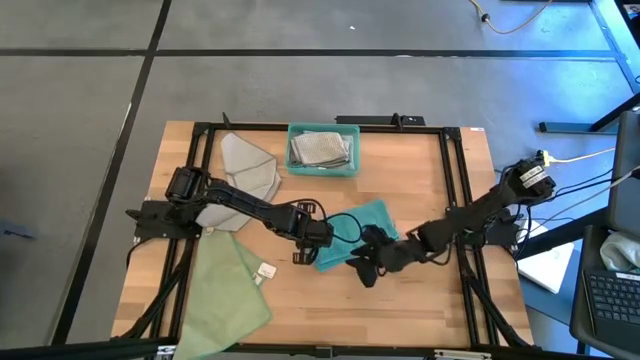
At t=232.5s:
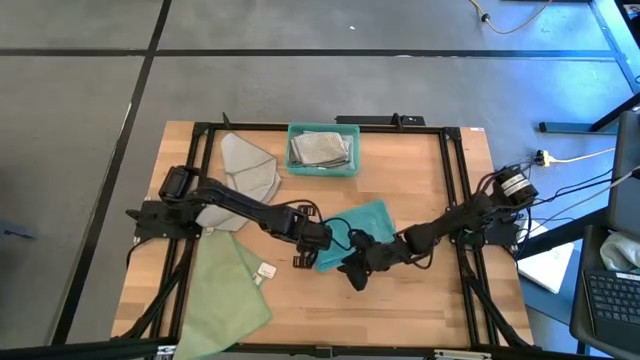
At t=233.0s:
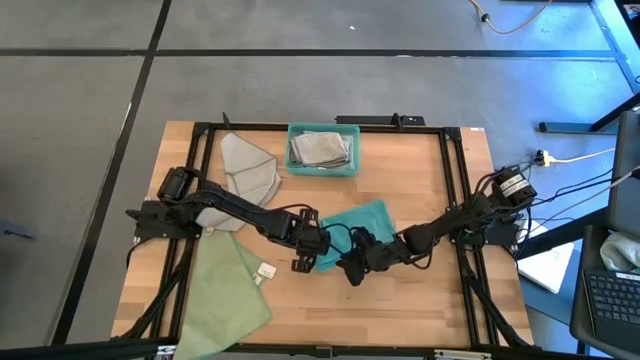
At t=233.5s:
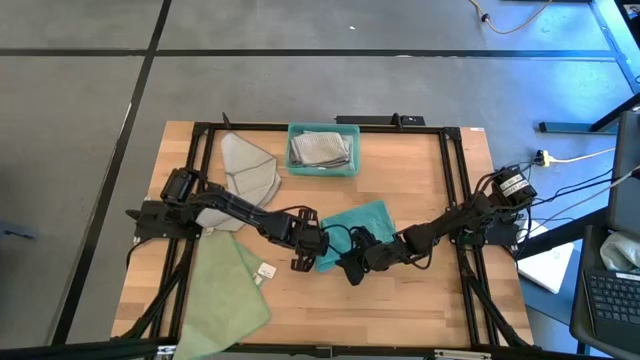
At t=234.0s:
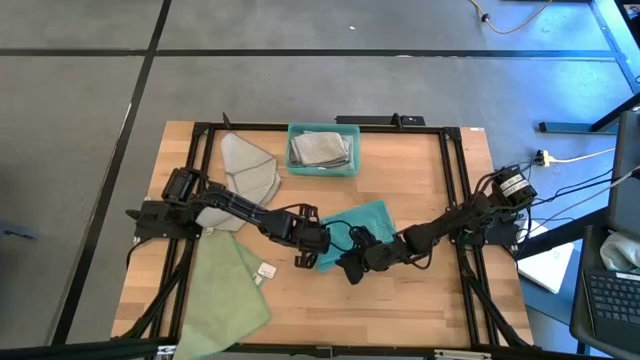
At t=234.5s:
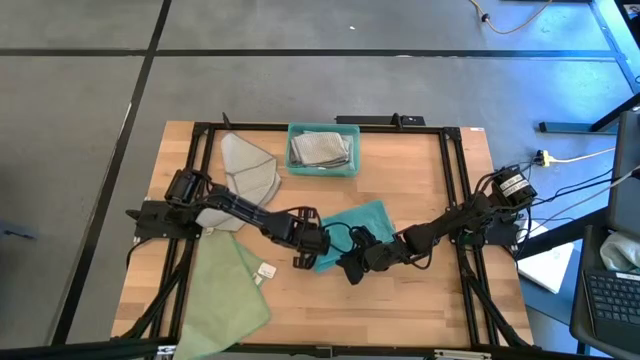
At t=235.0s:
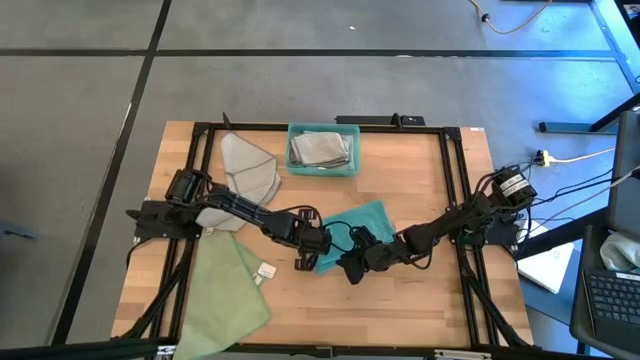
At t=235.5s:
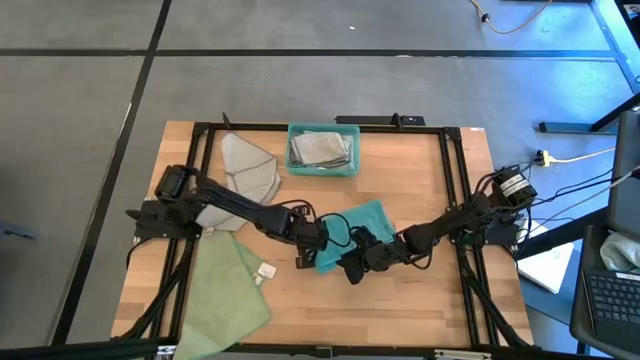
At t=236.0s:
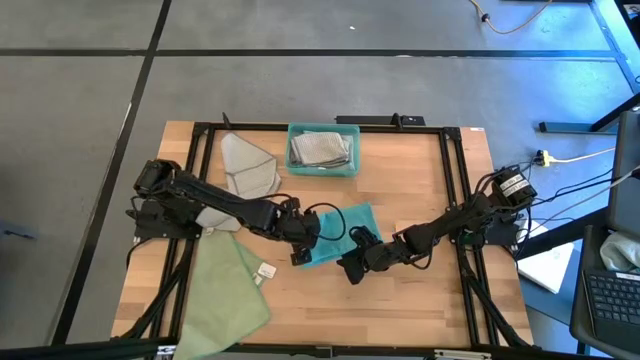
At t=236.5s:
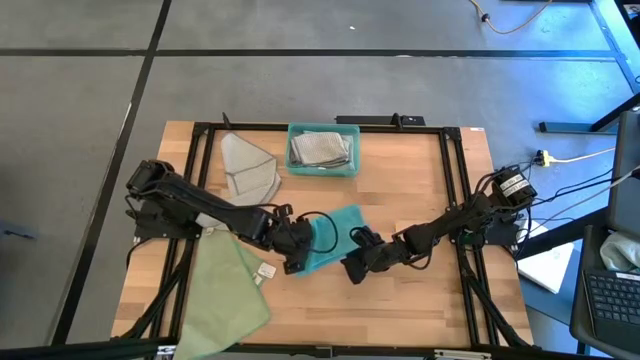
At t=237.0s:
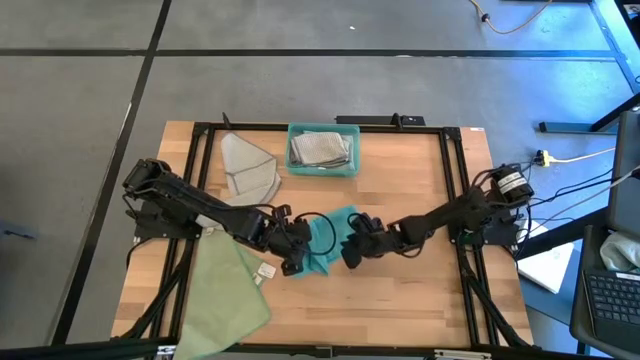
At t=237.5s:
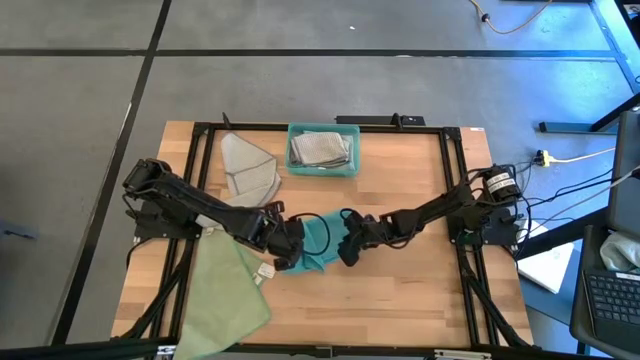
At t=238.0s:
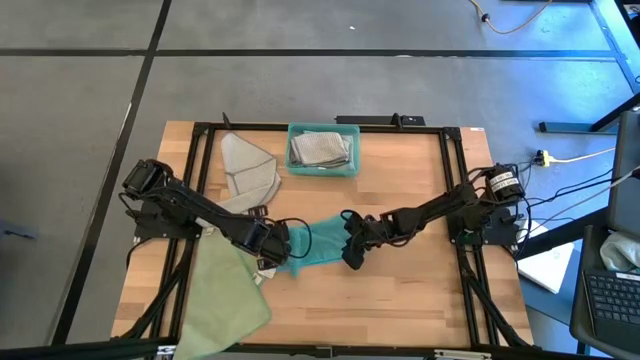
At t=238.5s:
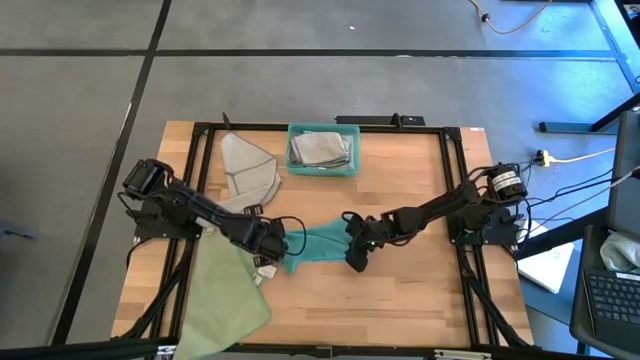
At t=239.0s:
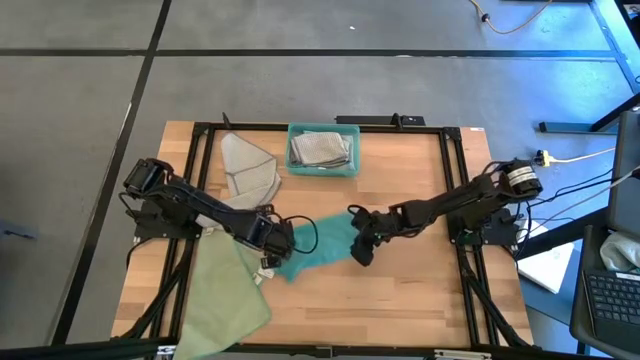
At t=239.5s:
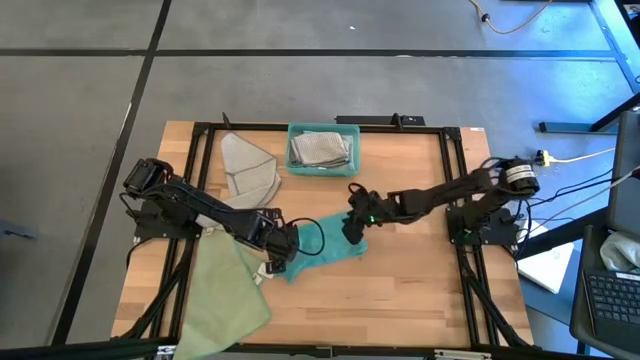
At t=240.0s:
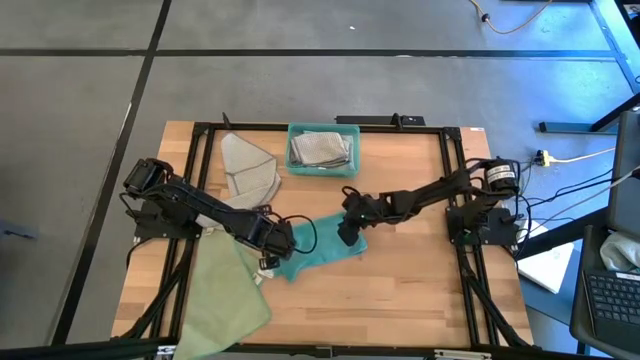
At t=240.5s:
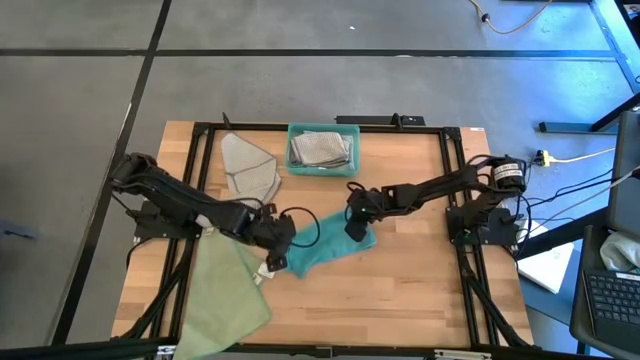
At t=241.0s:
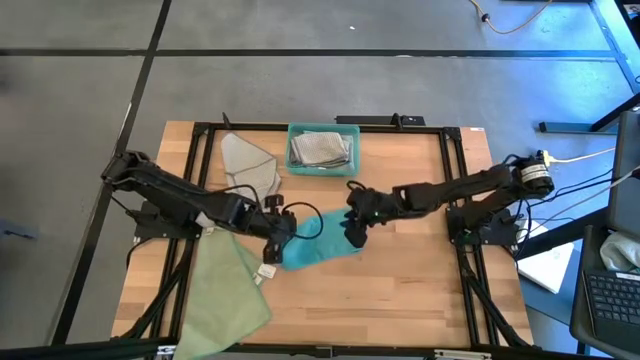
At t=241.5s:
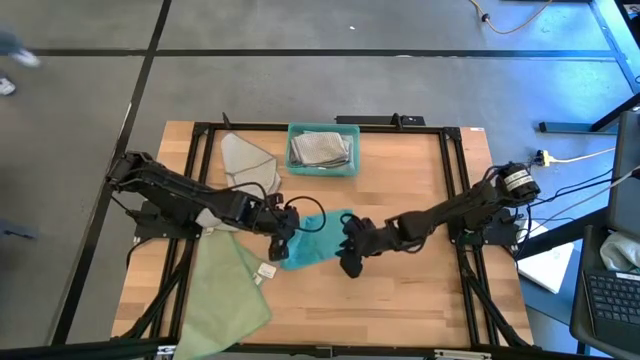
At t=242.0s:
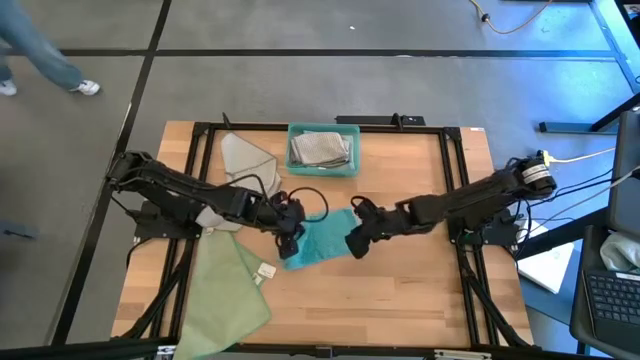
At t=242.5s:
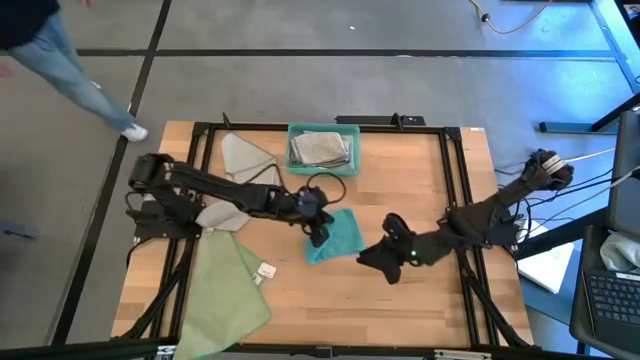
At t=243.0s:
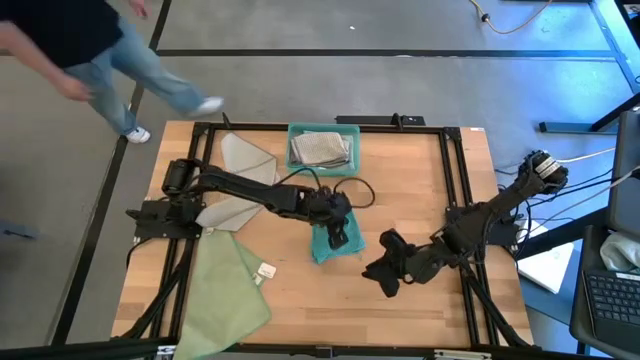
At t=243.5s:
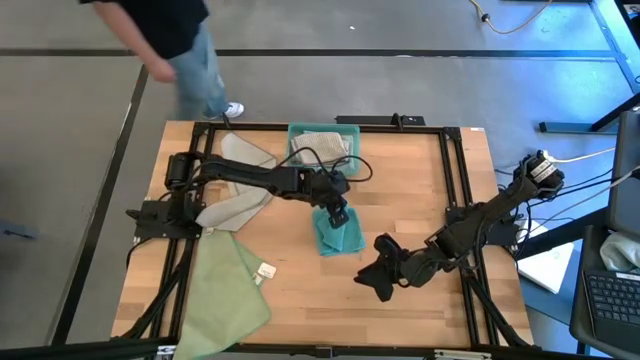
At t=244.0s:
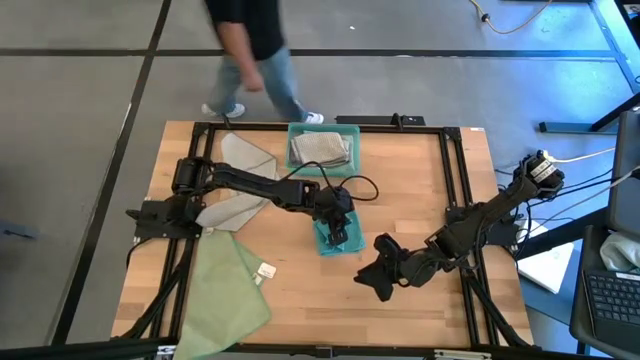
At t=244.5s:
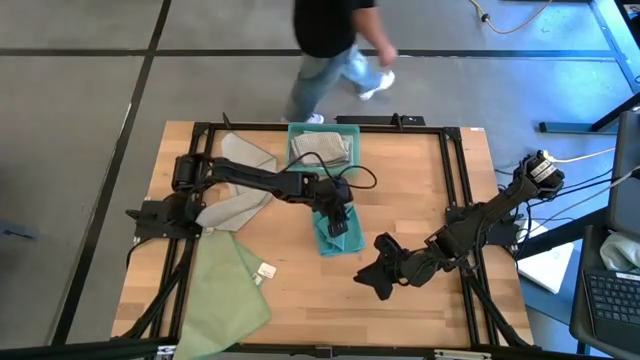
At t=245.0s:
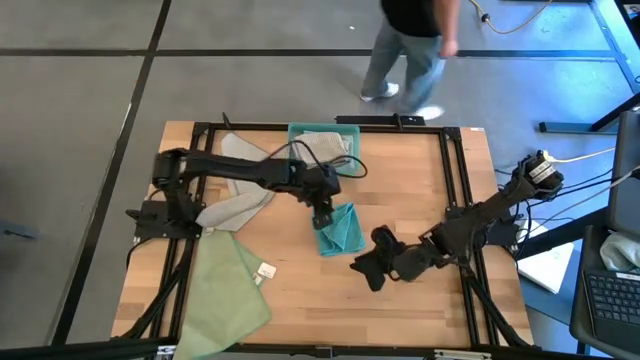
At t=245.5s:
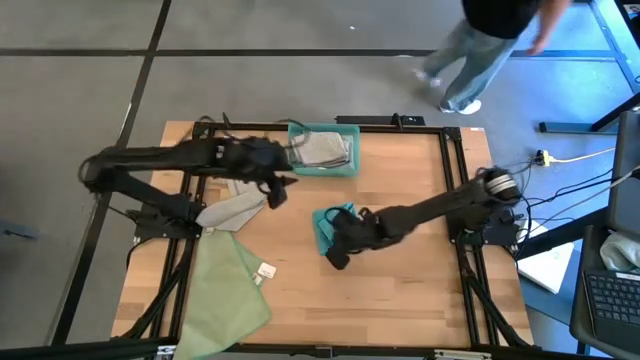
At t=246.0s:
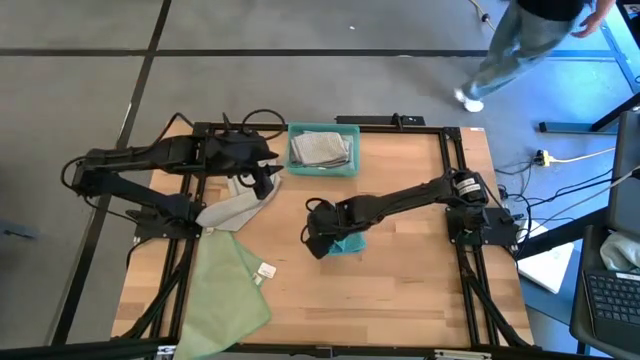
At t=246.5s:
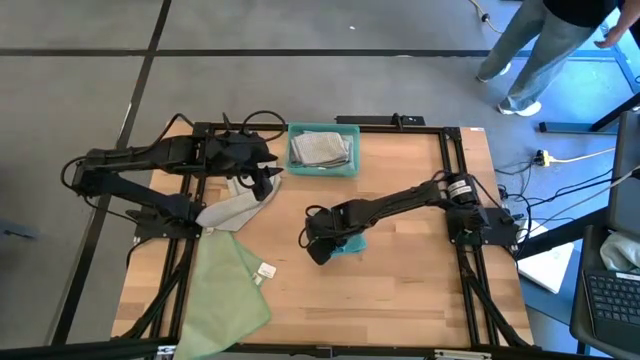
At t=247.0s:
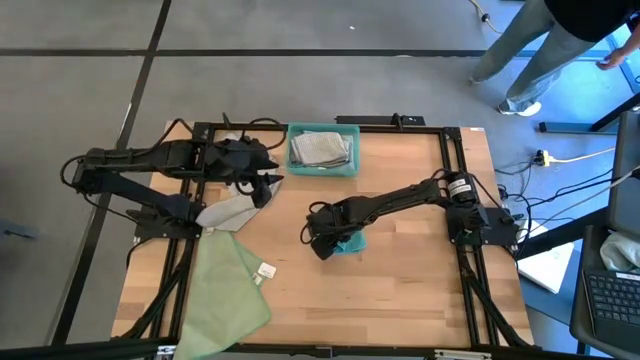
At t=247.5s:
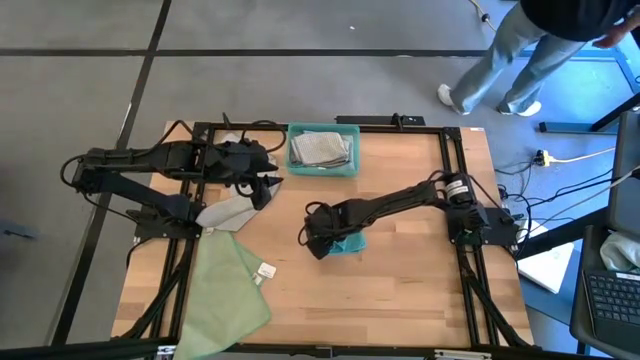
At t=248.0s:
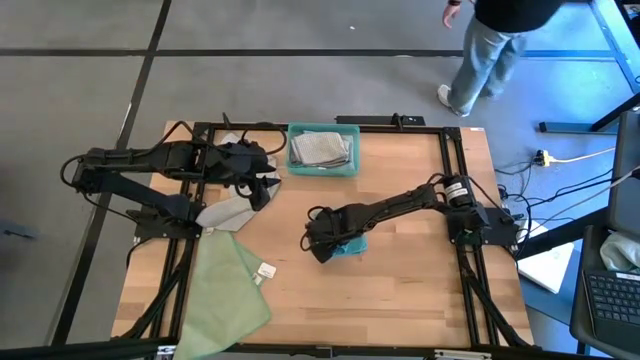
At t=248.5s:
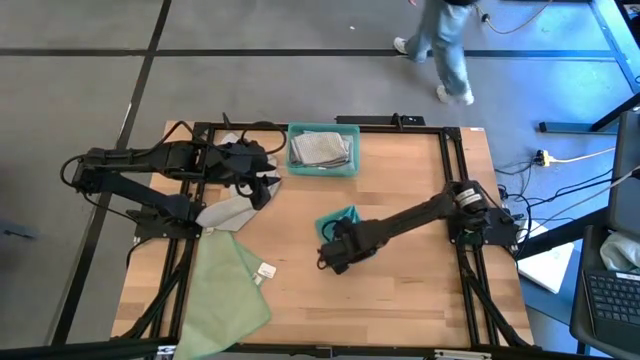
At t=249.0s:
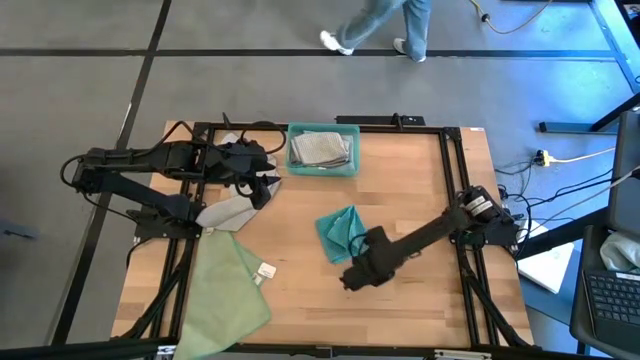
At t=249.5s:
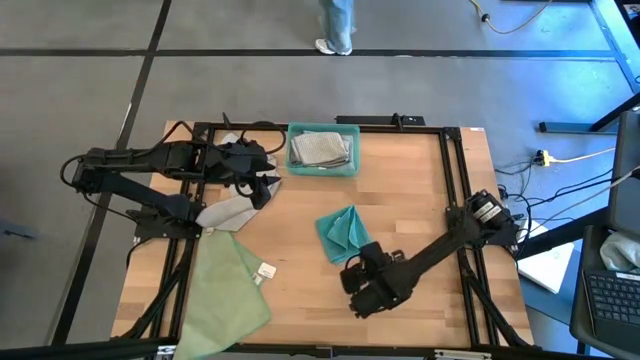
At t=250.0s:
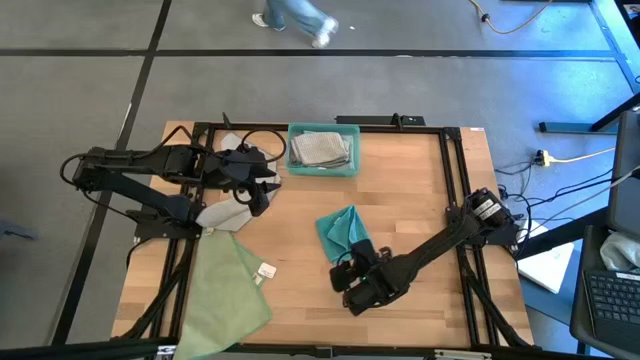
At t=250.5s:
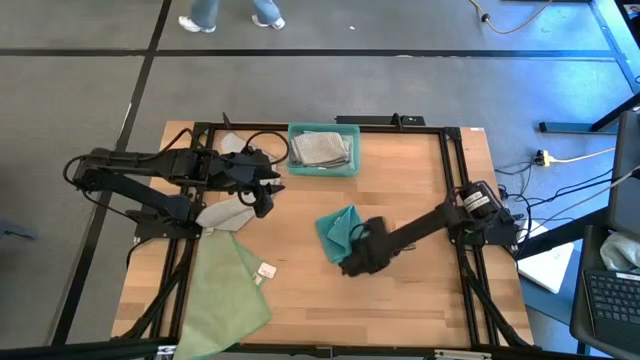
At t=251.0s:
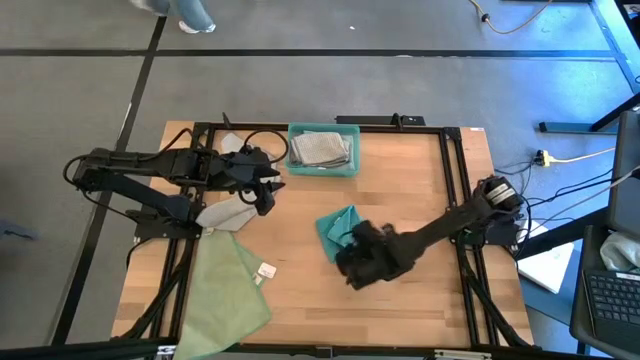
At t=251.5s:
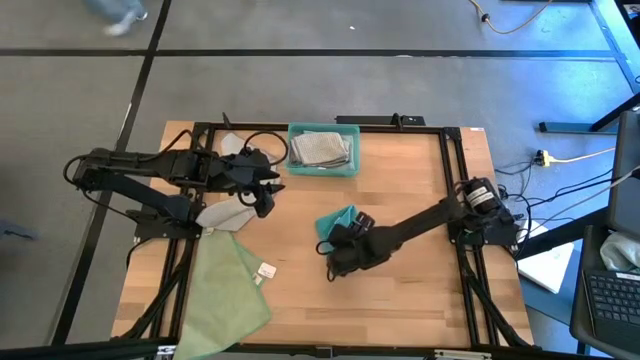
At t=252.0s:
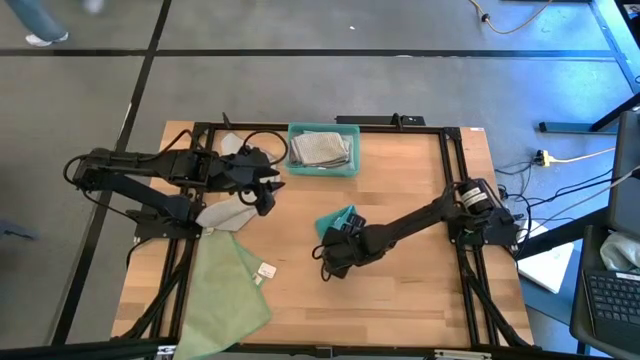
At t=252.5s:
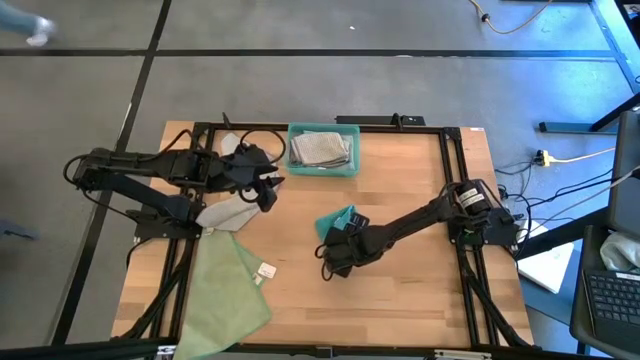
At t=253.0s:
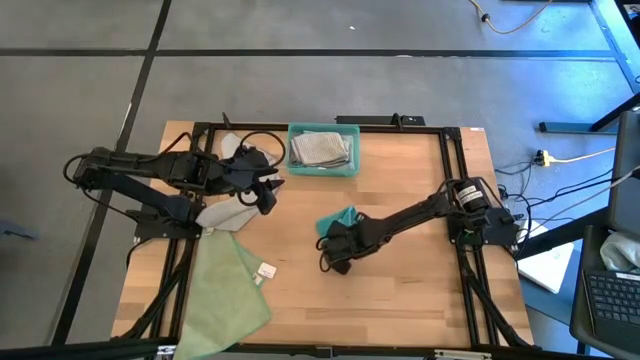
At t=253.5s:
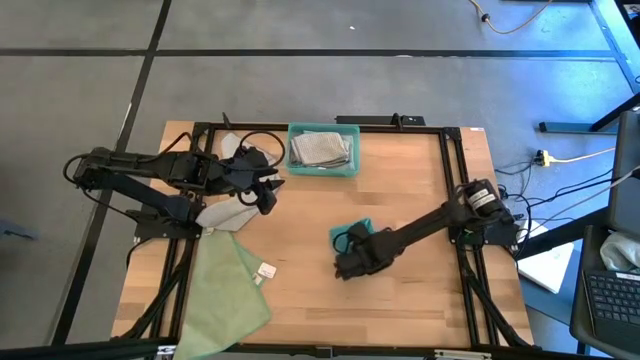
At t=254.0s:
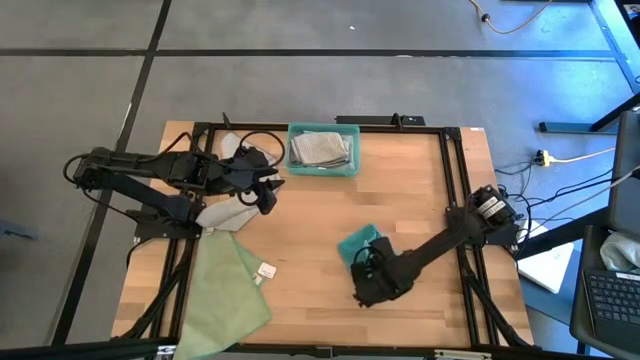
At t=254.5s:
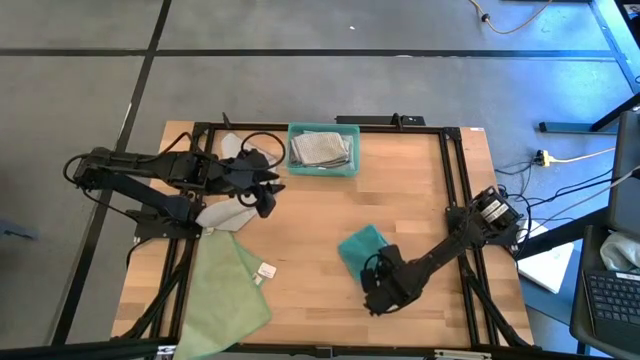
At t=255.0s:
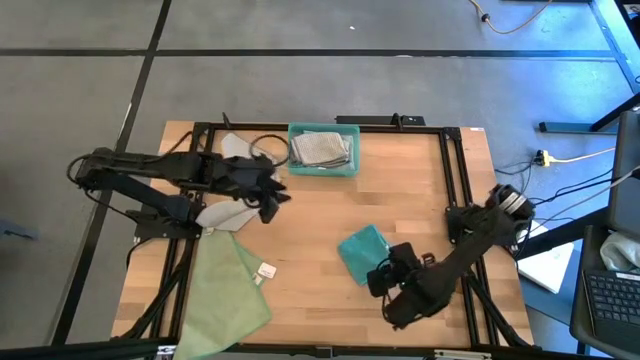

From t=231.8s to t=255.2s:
Task: Fold microfiber towels
Fold the blue towel
